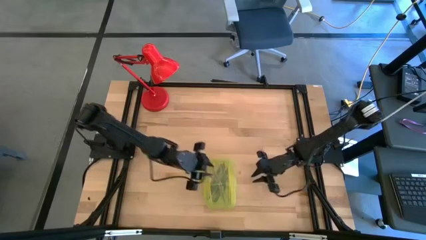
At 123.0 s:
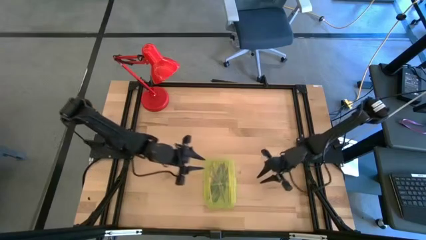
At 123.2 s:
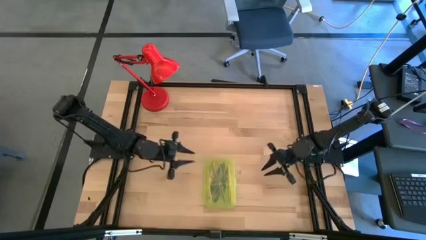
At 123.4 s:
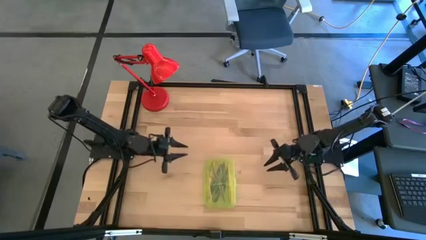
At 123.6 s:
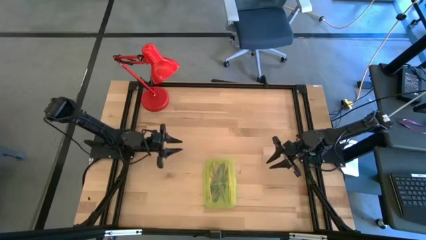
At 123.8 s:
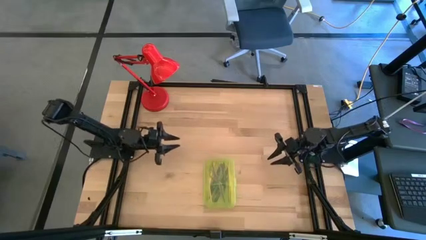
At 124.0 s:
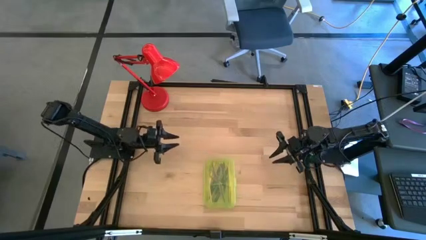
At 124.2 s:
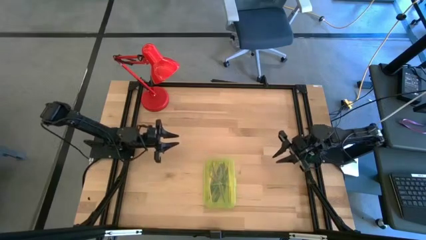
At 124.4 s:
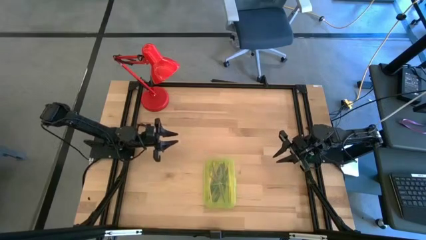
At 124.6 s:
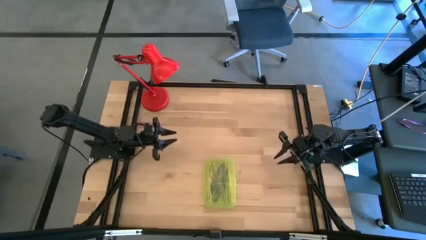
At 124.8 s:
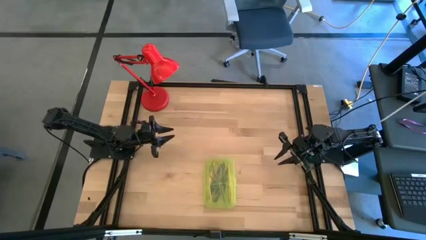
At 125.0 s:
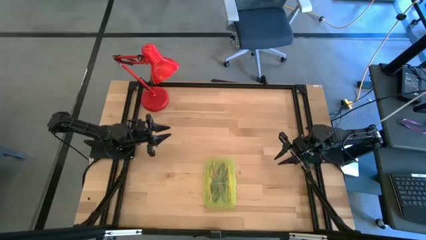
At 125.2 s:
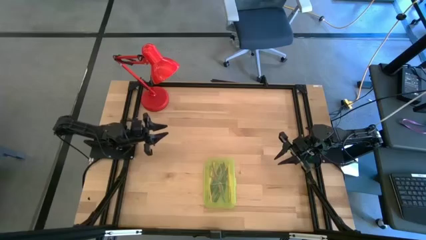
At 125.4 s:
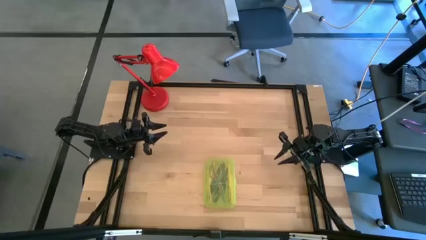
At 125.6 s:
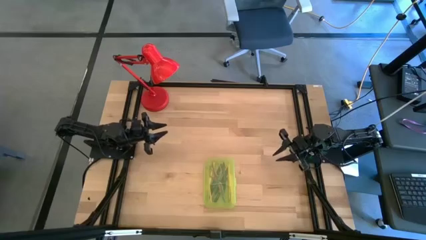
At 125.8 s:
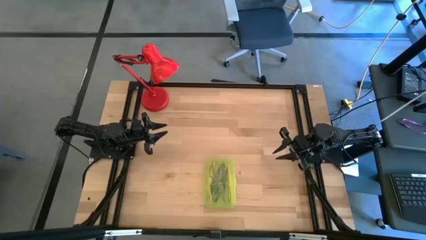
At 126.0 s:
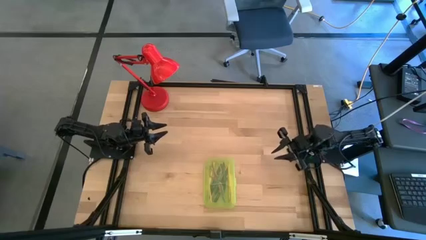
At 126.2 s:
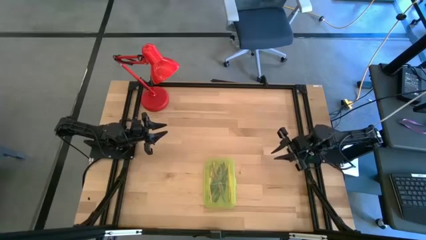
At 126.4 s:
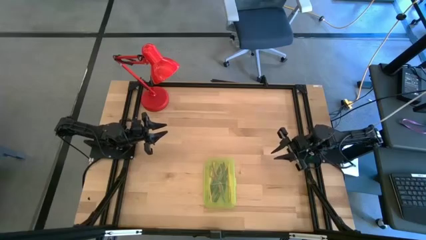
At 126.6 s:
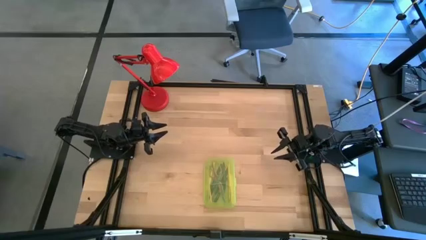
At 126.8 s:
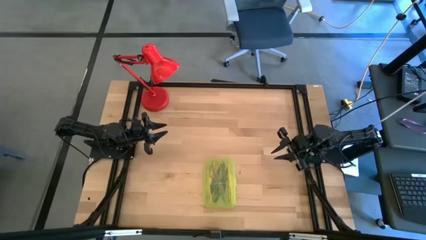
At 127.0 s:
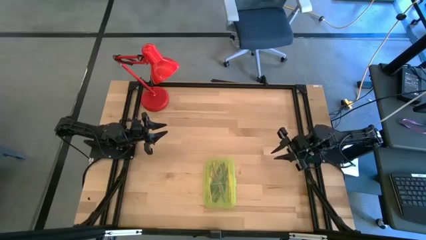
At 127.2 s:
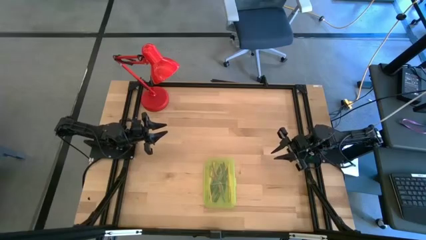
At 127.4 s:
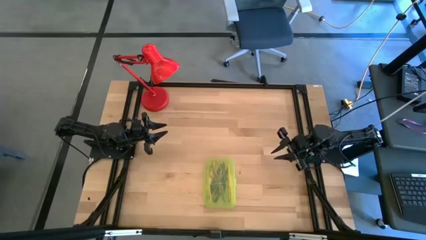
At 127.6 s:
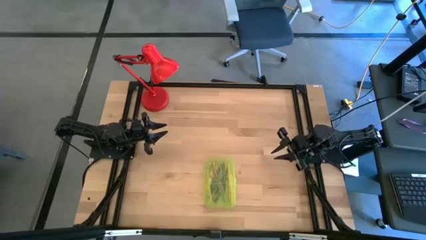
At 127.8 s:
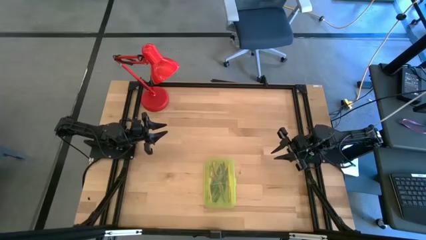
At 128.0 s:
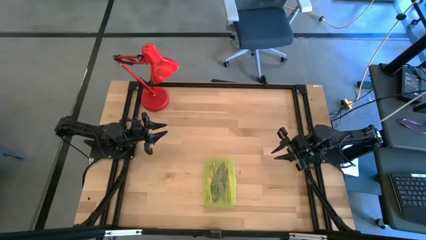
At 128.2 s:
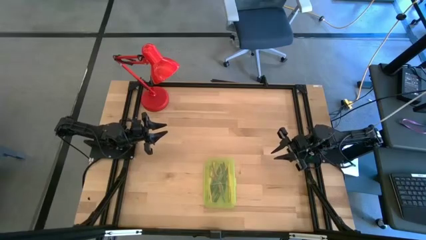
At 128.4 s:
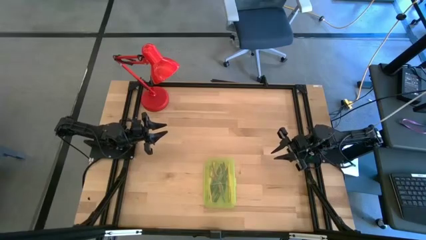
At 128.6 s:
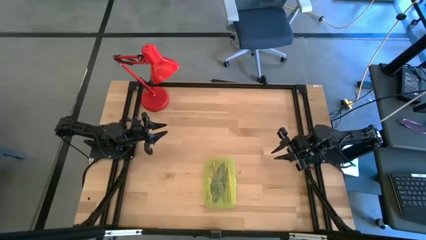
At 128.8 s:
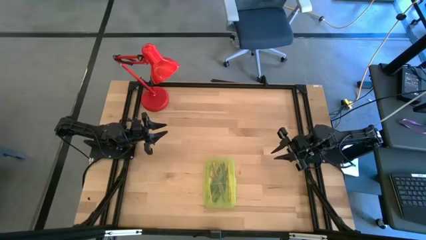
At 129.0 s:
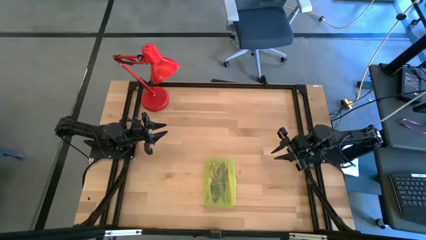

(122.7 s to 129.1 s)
Task: Pick & place school supplies into a supply box
Return to Home Position

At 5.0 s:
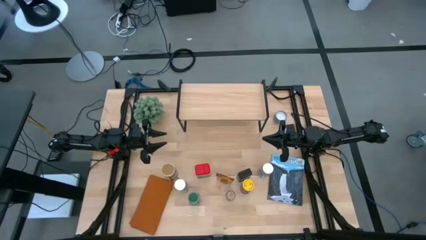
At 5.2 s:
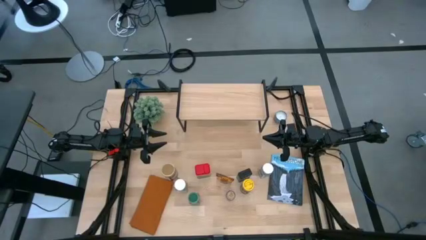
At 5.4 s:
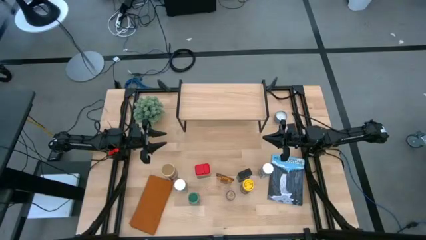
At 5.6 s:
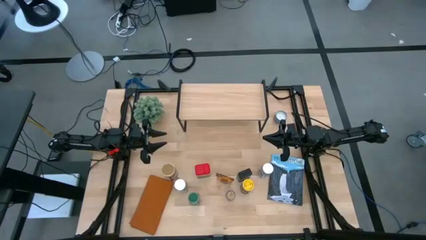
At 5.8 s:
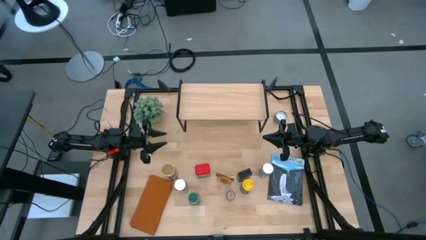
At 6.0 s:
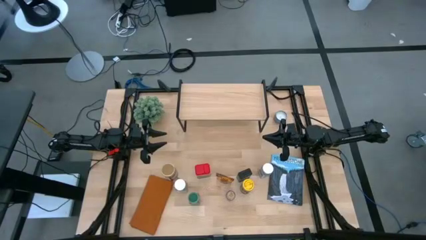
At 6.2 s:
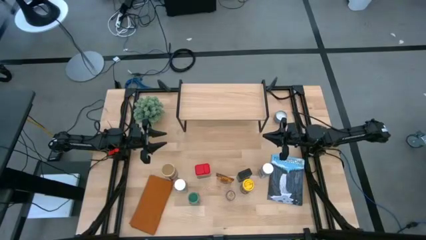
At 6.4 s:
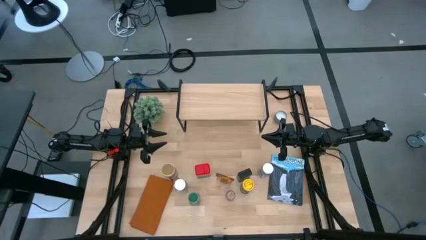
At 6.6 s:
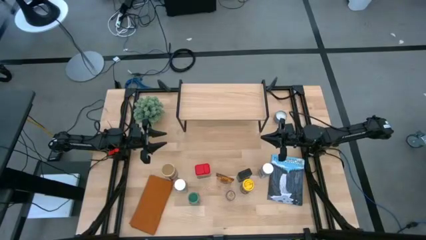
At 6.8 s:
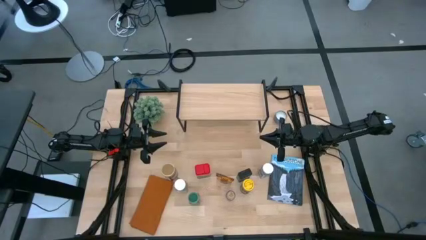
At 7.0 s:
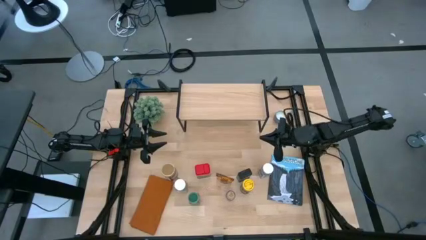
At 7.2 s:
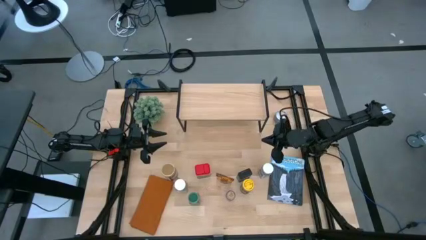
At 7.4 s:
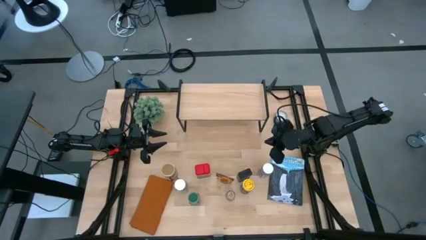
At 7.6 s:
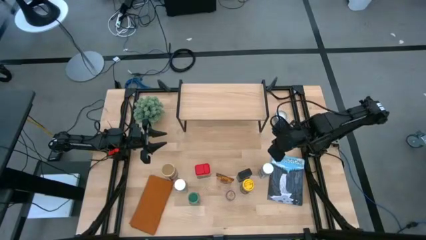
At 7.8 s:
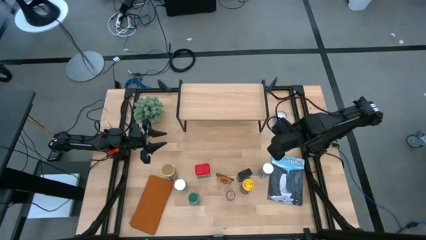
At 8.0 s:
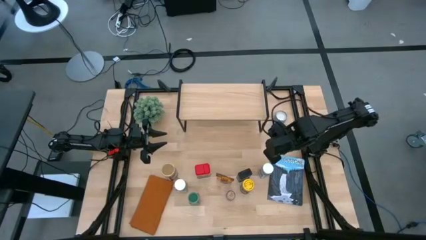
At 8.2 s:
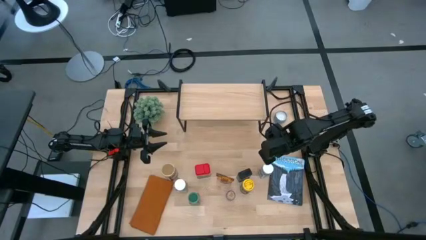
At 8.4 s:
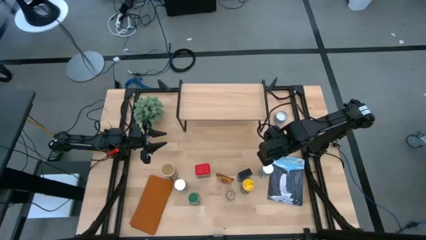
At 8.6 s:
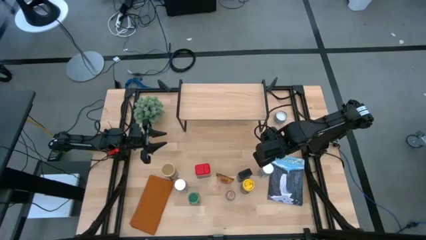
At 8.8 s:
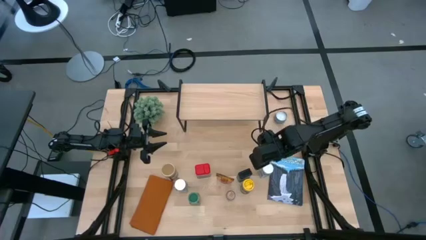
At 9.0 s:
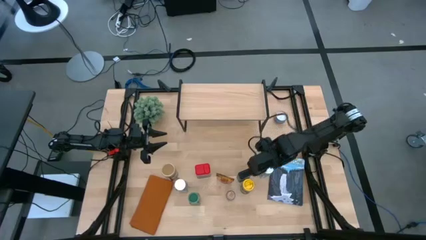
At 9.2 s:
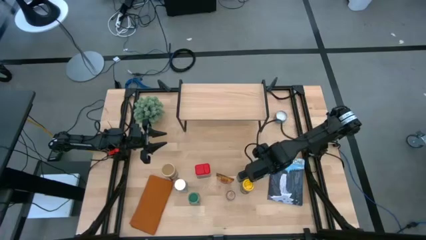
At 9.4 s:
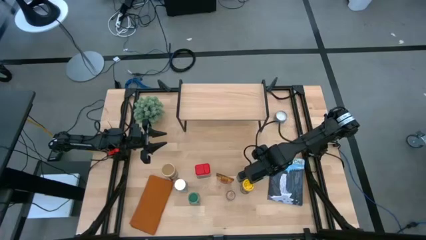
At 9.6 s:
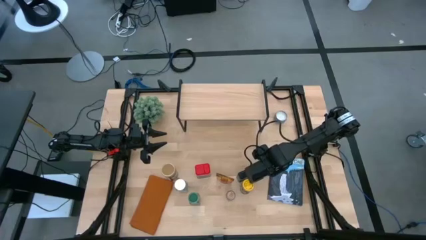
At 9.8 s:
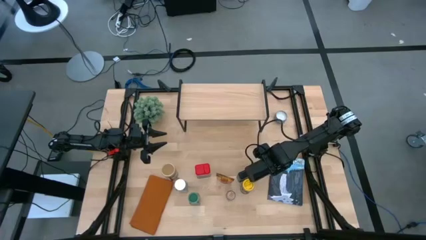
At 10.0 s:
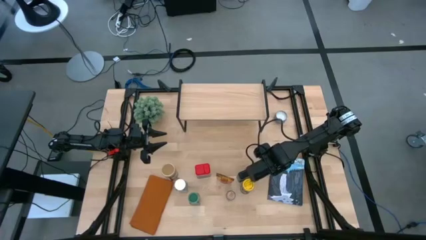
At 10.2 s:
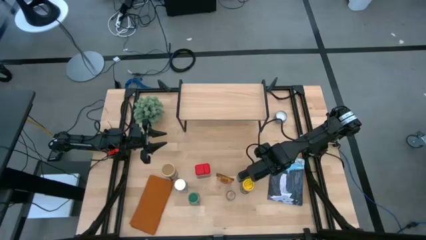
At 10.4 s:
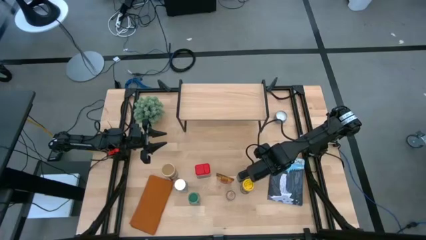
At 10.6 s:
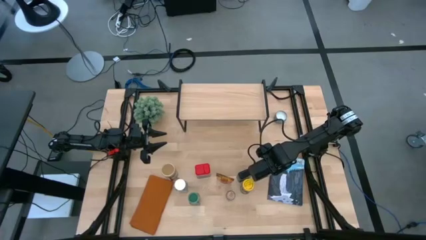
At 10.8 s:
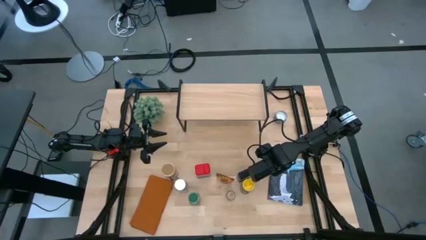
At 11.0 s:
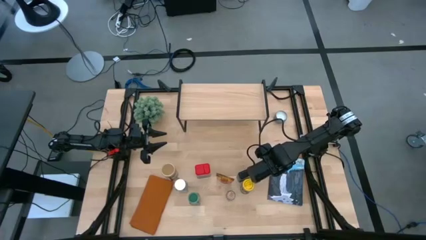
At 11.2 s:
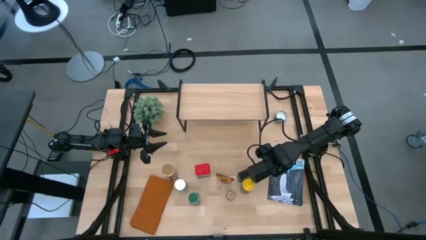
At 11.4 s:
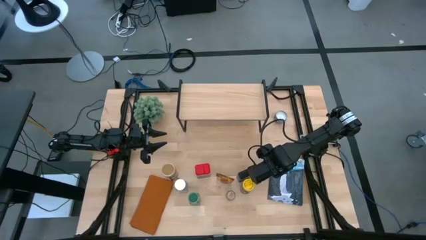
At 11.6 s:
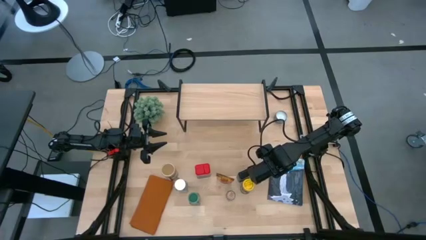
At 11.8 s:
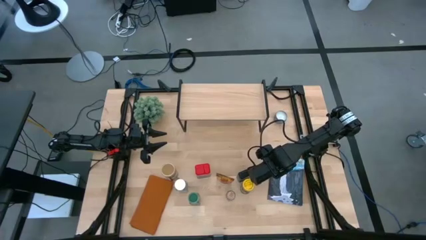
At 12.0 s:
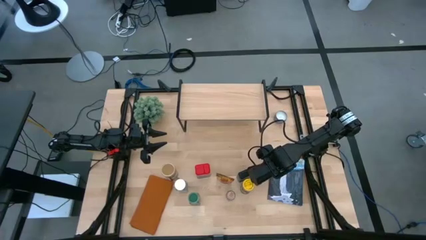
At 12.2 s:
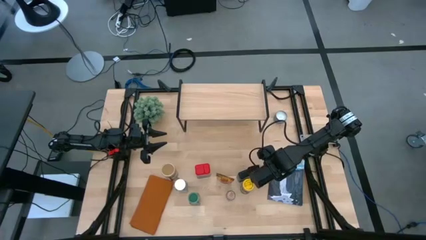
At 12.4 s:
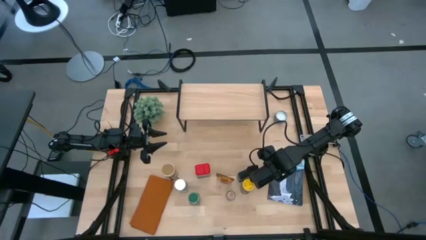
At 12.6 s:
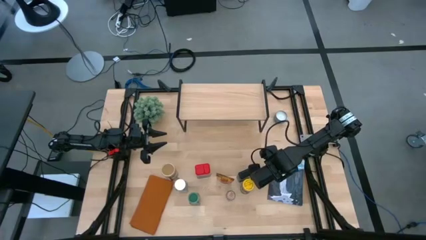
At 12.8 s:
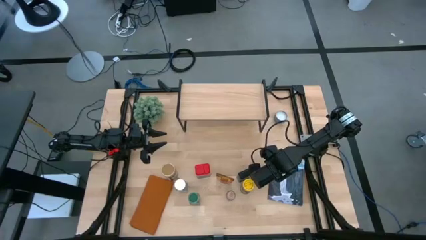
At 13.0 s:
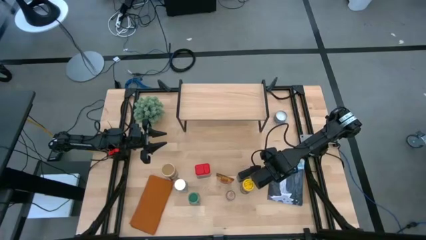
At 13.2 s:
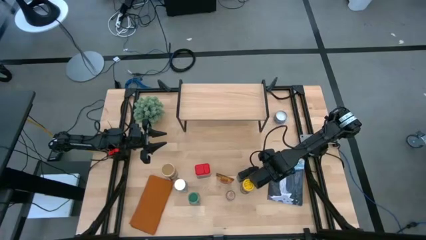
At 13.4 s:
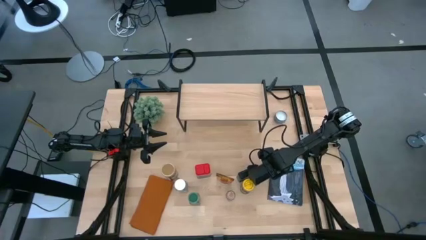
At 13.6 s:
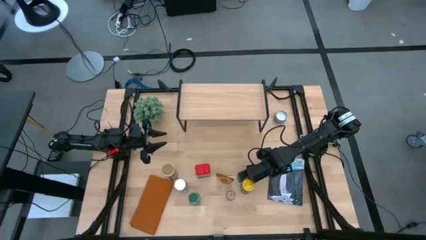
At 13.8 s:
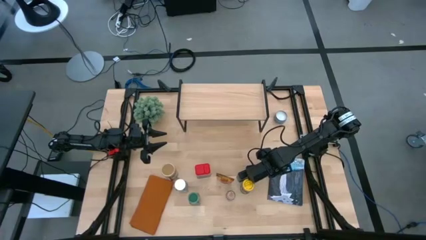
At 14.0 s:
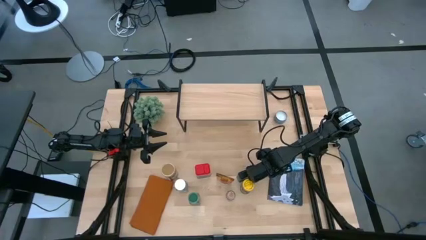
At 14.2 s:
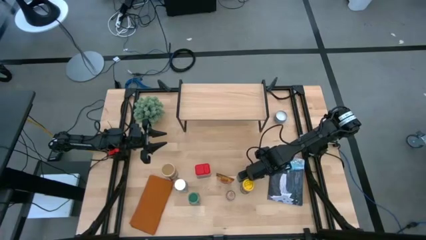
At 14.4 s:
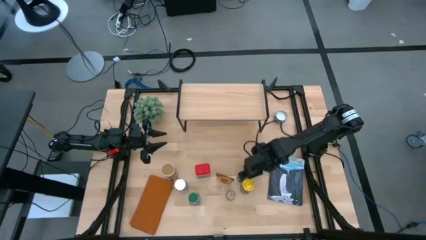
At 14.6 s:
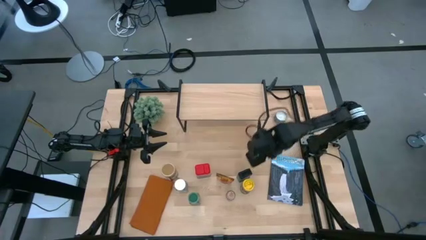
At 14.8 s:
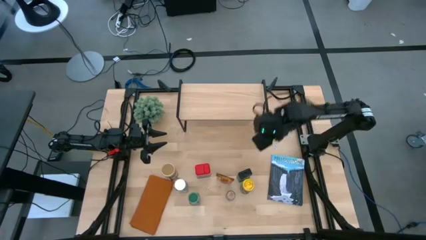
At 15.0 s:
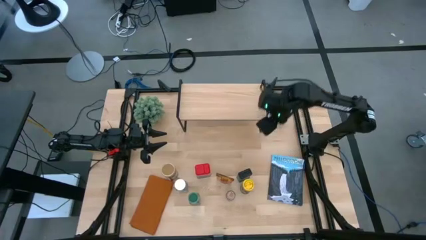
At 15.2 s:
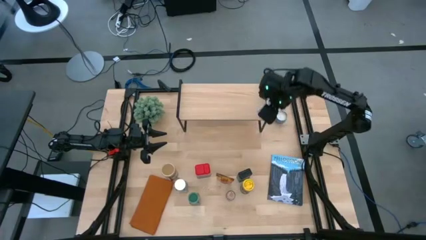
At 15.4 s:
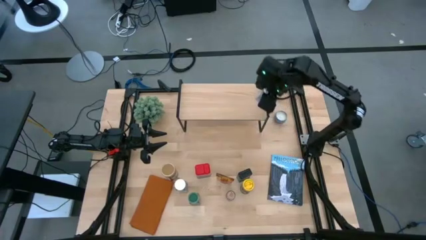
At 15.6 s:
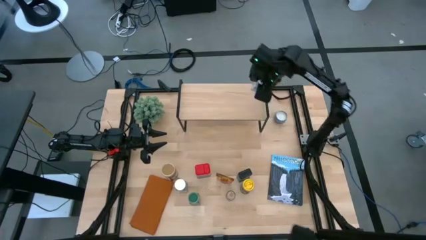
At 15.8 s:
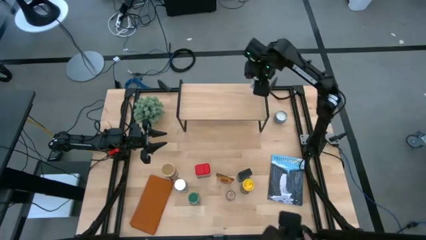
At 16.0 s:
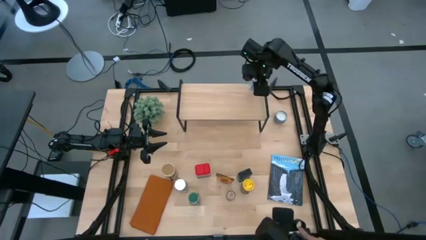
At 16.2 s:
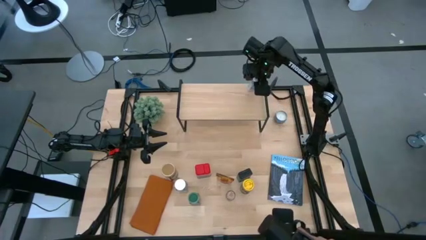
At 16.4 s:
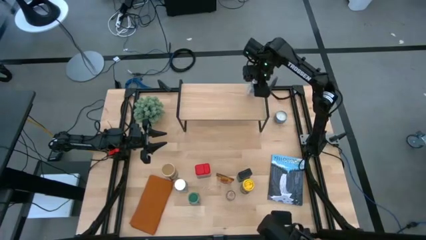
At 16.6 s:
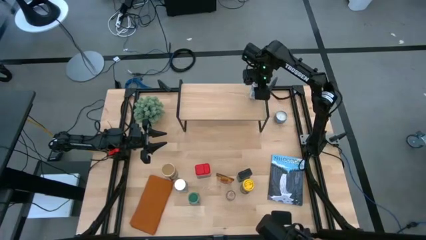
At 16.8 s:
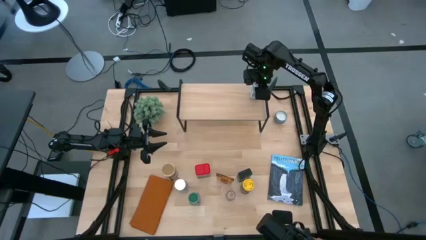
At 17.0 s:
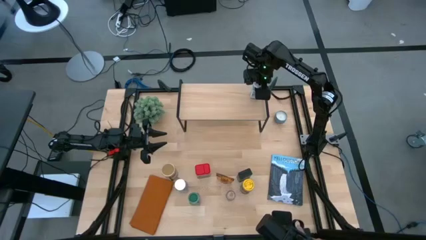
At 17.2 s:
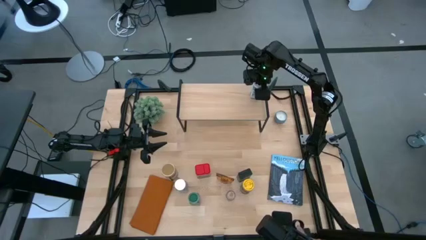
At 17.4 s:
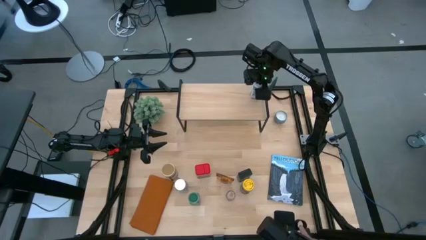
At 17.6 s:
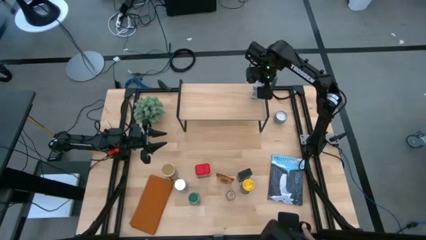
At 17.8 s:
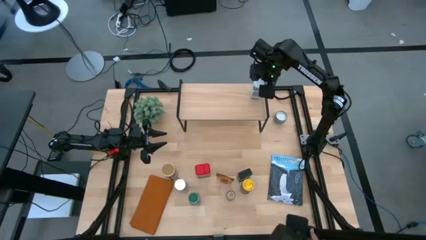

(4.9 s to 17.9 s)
Task: Shelf spices
Put the right white seasoning bottle on the shelf
